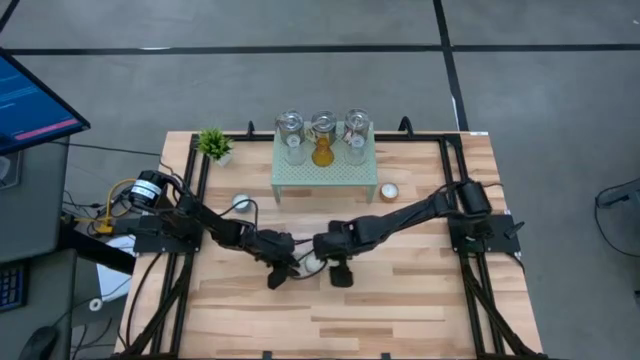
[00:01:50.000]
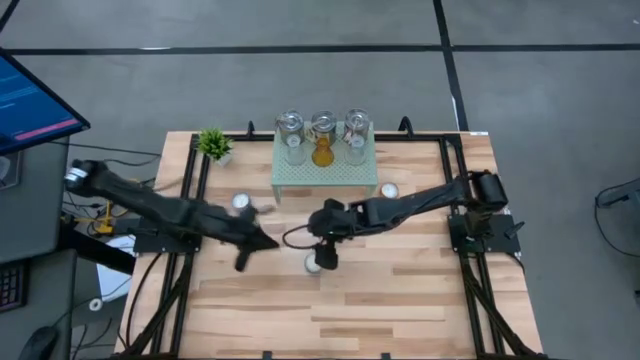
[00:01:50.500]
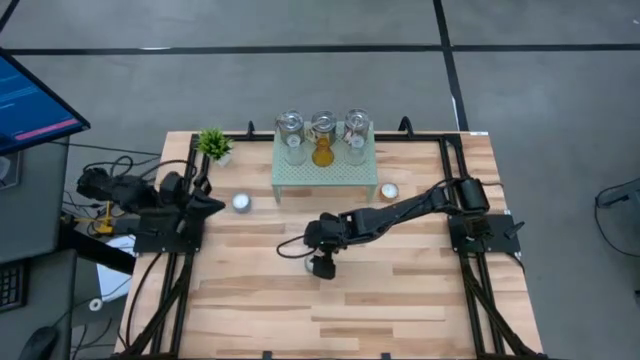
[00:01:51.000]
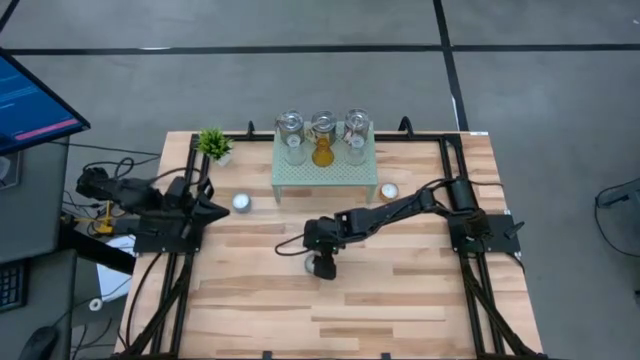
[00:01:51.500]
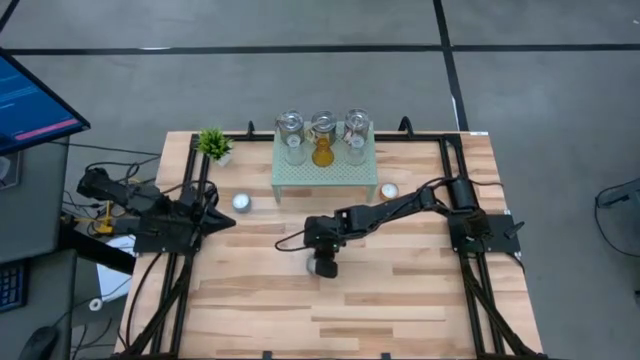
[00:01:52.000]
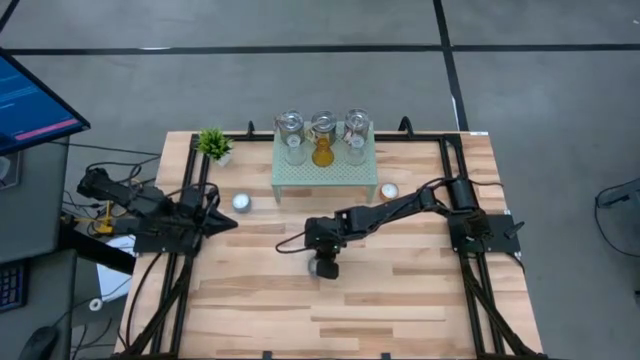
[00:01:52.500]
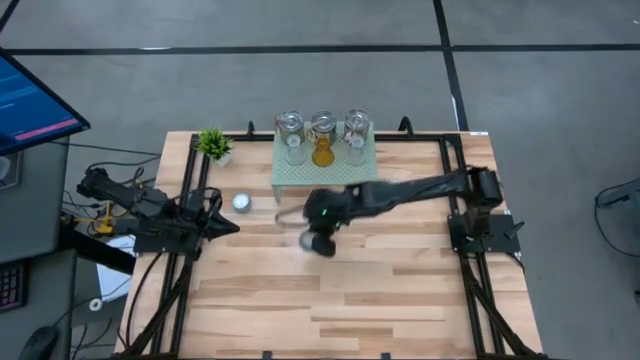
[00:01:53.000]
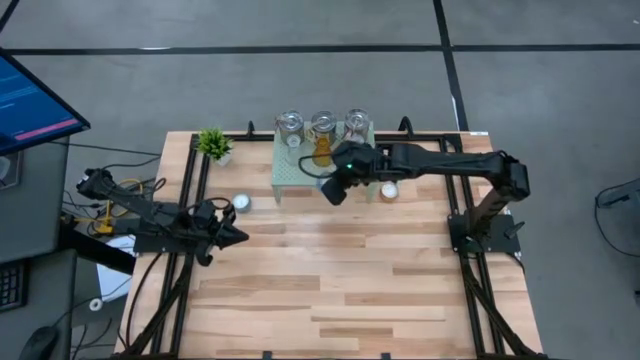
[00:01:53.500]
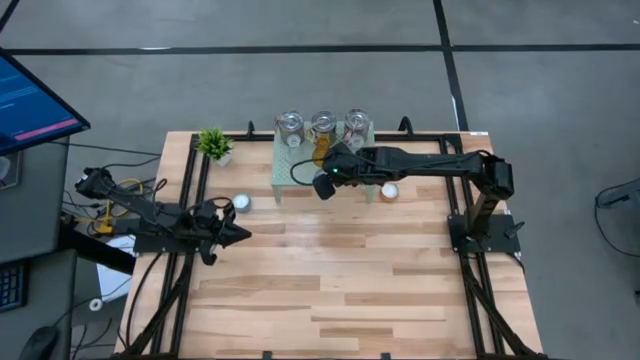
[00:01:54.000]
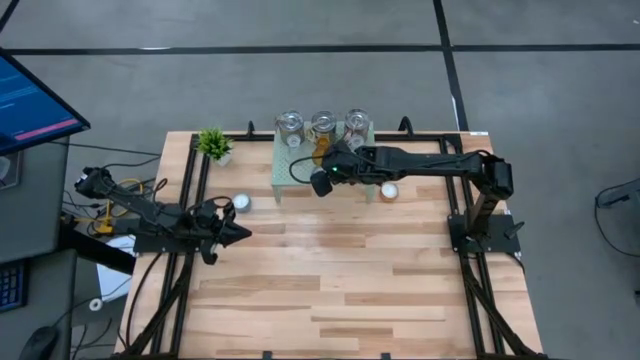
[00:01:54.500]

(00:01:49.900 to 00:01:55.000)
Task: Pick & Place candle stick holders
Put the blue scented candle on the shelf

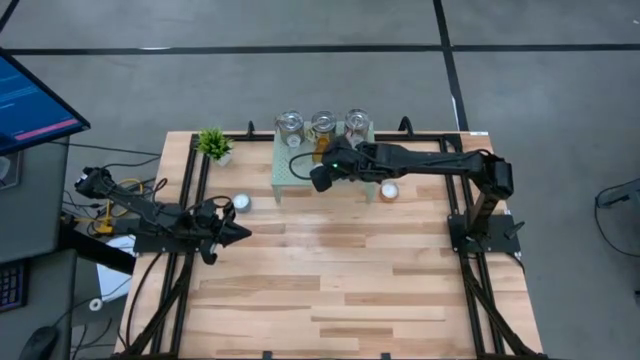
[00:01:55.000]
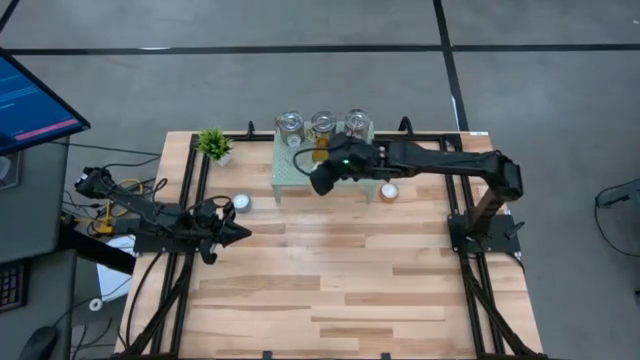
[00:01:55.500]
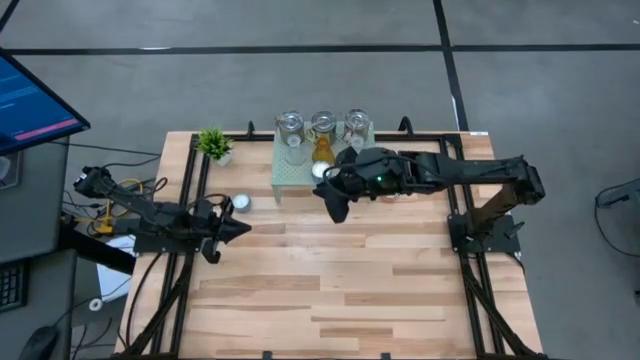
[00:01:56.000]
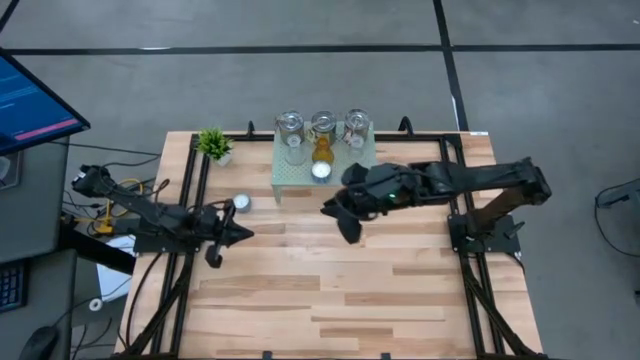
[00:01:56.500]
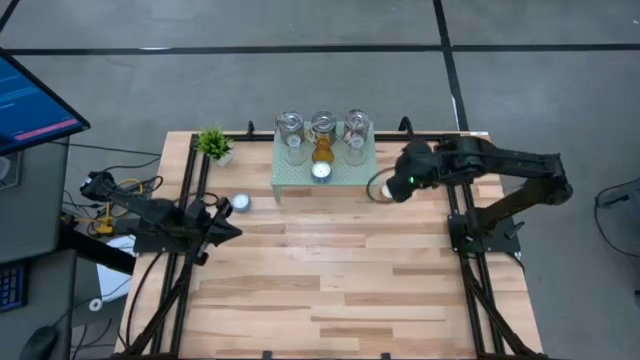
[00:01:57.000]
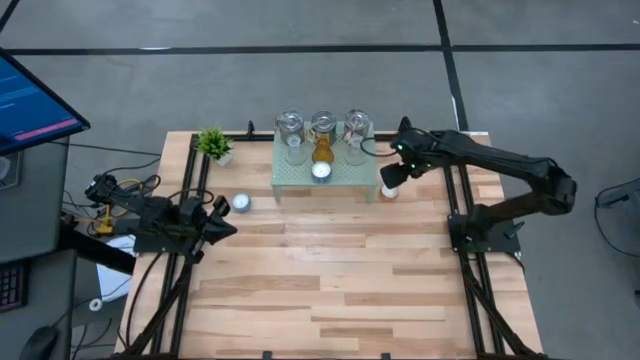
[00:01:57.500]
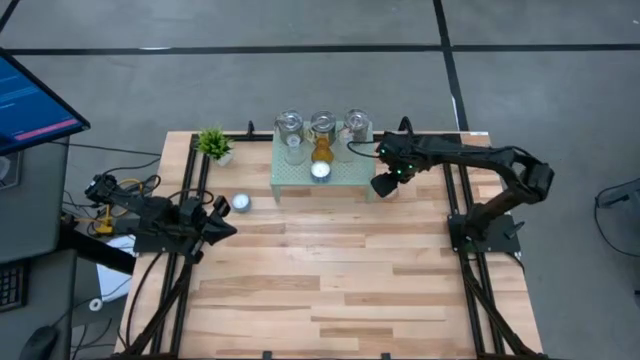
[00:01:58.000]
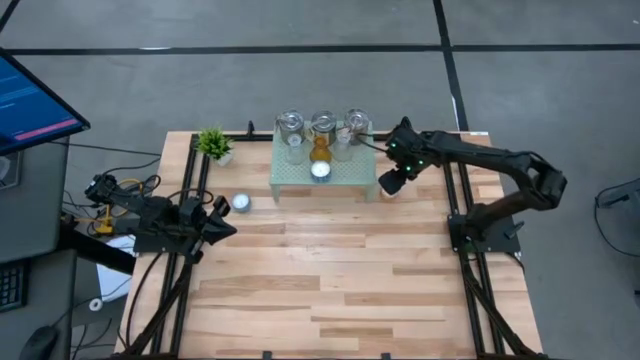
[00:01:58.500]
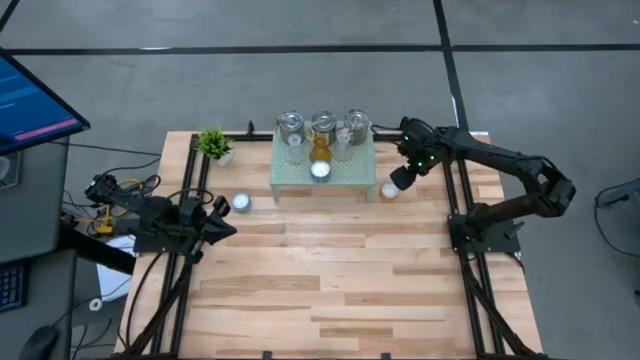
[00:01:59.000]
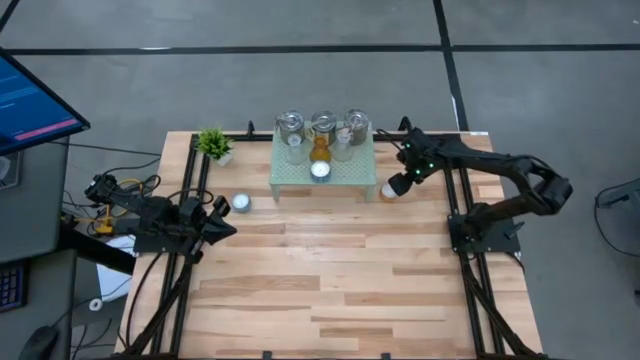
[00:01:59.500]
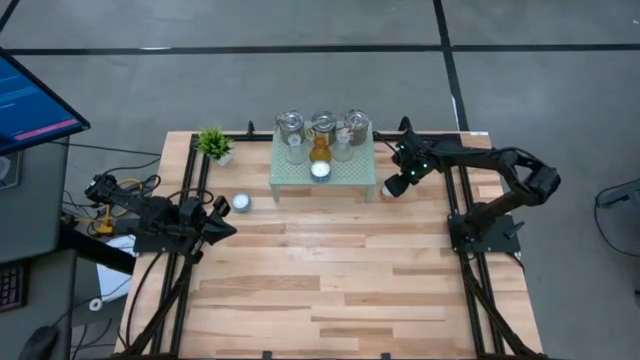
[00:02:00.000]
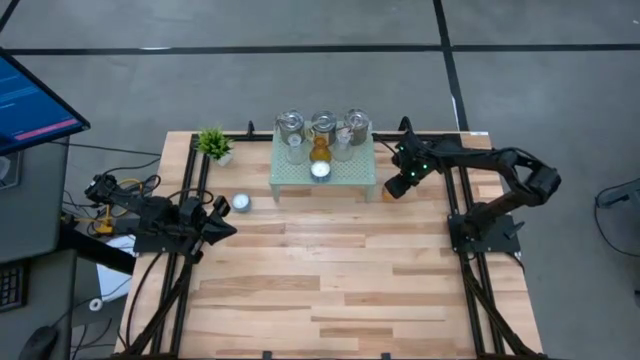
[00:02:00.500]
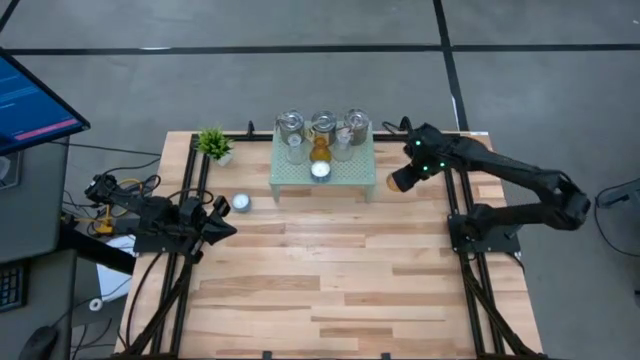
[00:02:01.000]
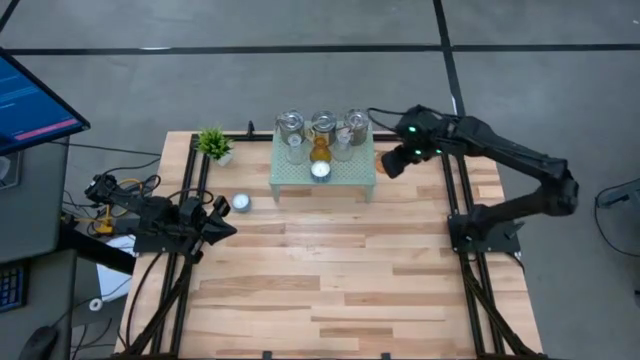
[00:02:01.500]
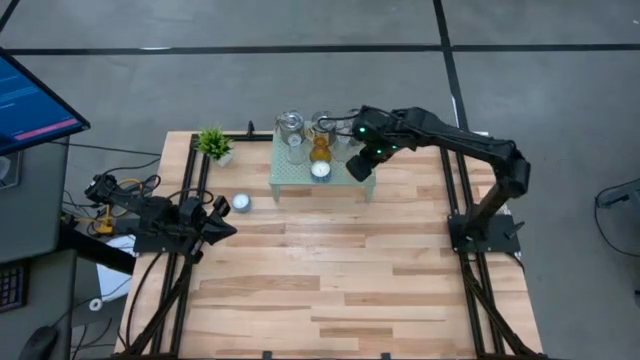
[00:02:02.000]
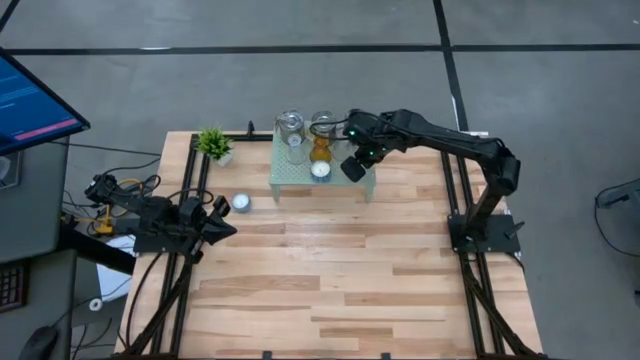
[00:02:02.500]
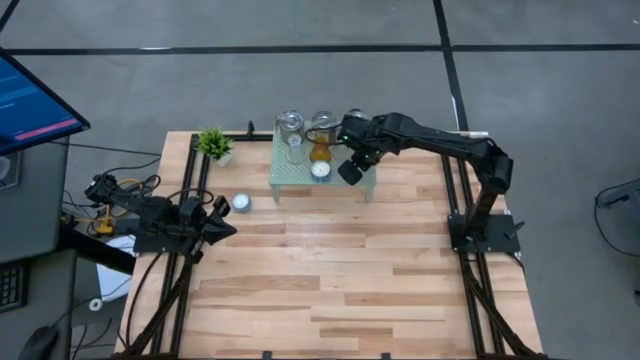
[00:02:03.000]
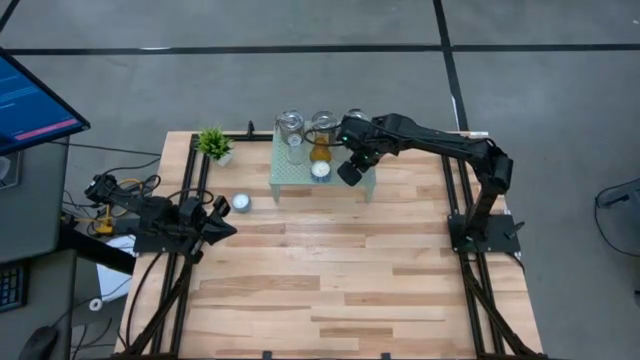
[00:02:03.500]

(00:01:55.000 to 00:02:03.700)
Put the orange scented candle on the shelf

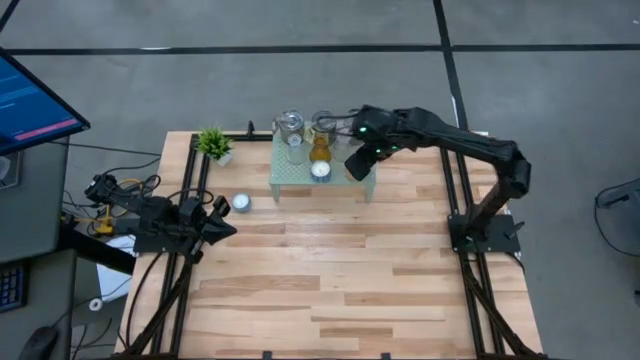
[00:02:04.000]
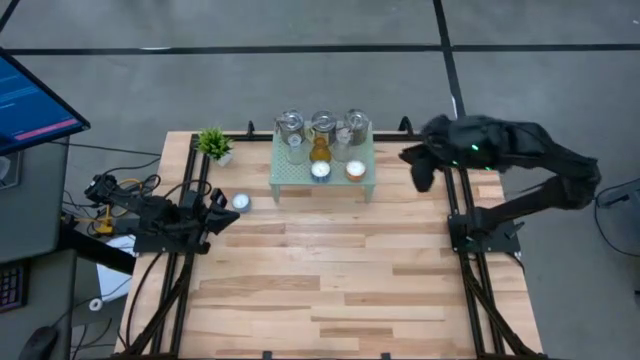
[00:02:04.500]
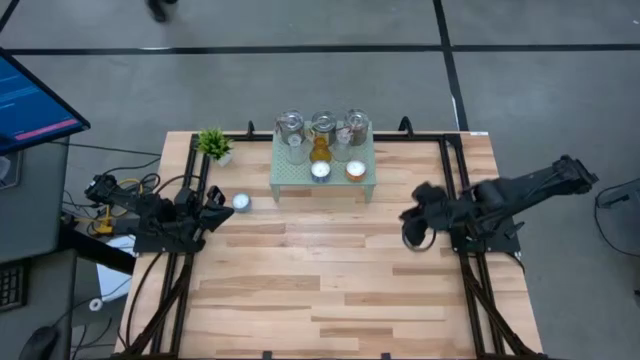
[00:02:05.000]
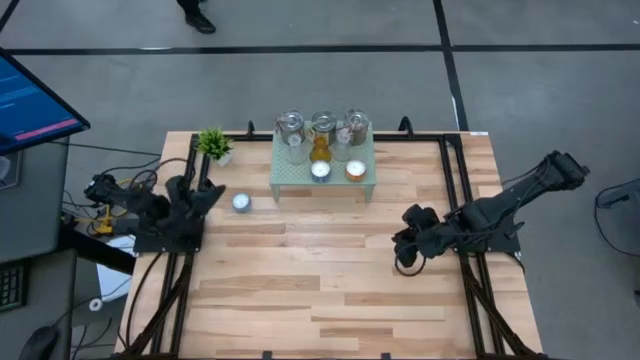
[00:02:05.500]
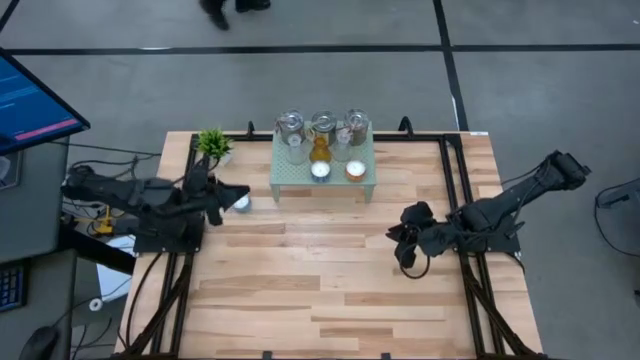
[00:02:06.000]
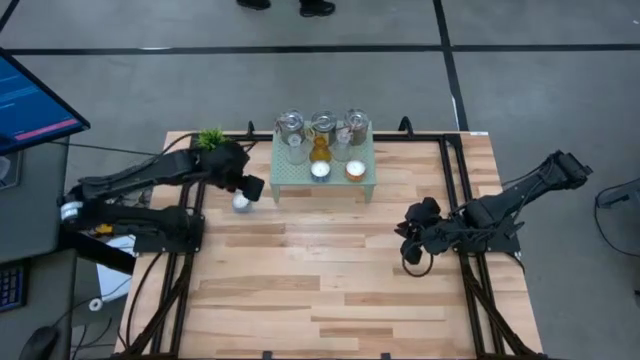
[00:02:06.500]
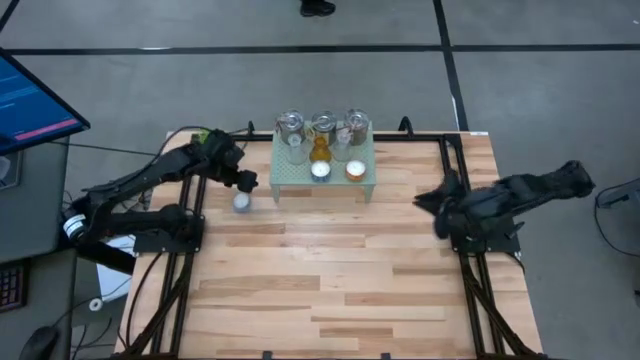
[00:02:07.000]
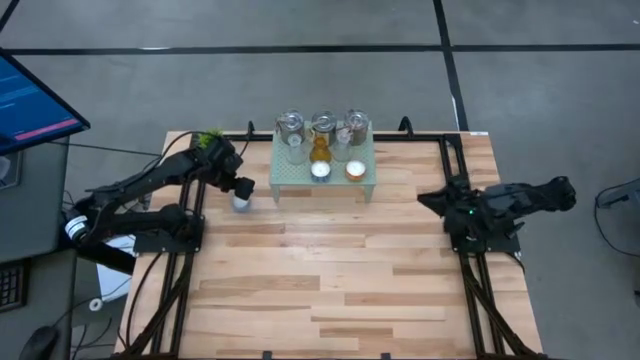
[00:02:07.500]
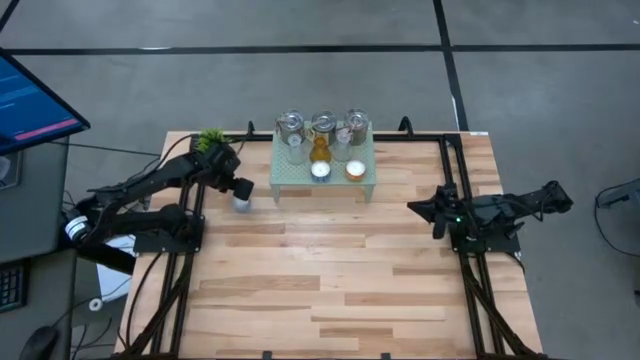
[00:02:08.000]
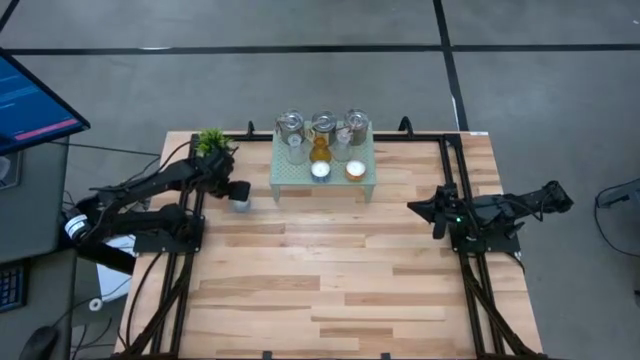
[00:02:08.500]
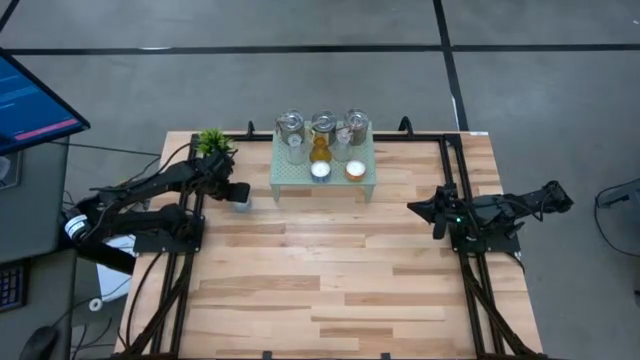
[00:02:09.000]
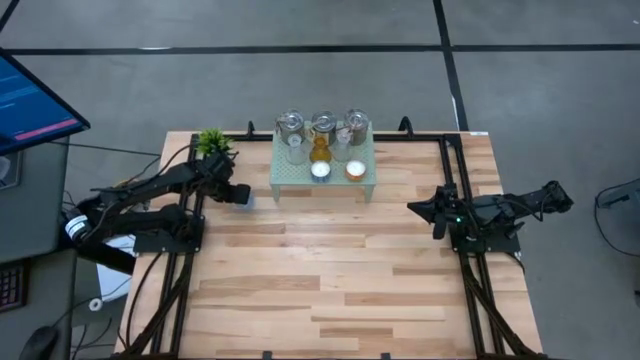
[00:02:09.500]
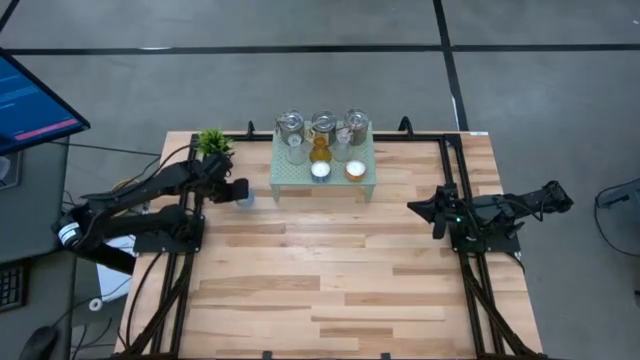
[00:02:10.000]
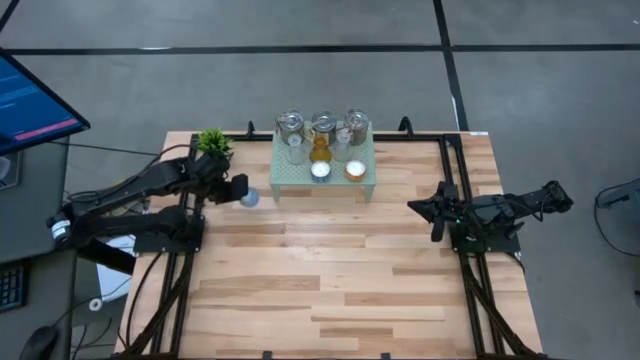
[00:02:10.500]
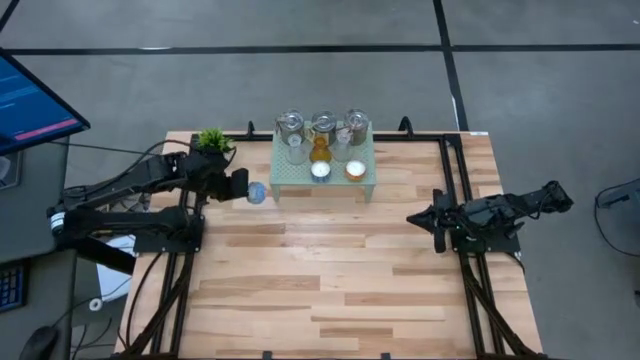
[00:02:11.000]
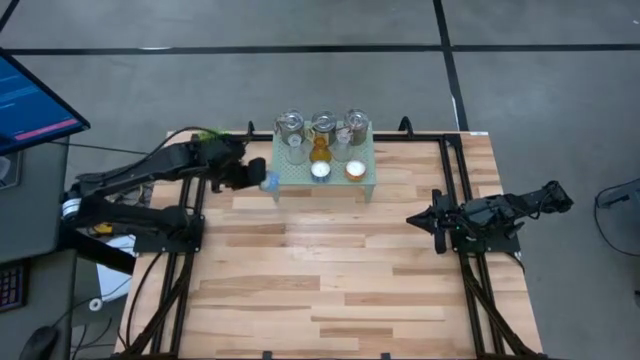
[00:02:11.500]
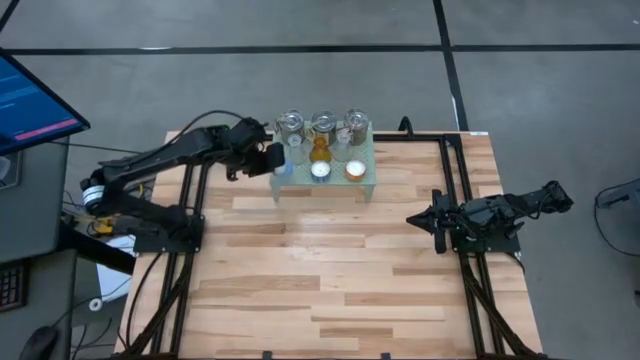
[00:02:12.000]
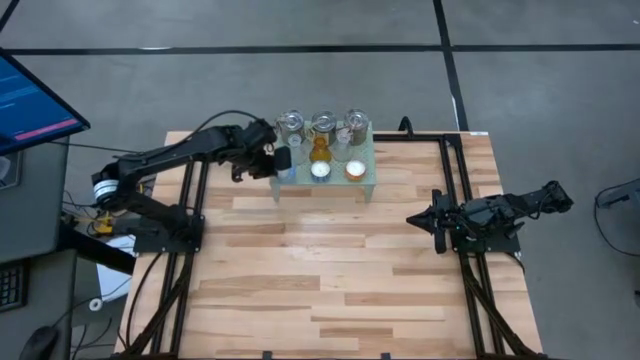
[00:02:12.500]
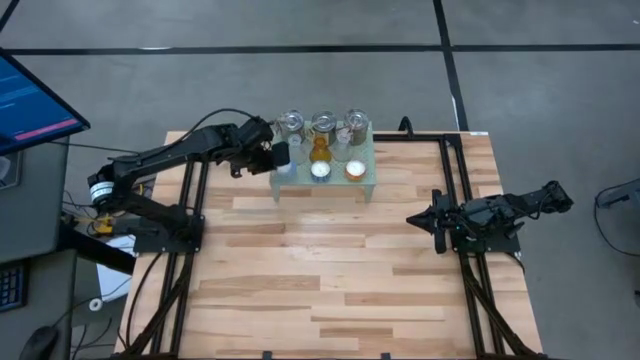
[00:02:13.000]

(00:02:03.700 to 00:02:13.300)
Put the light blue scented candle on the shelf
